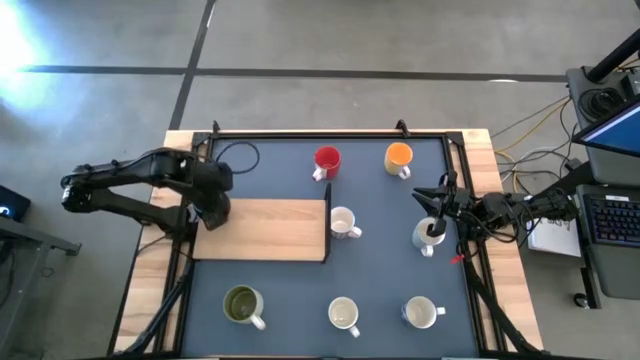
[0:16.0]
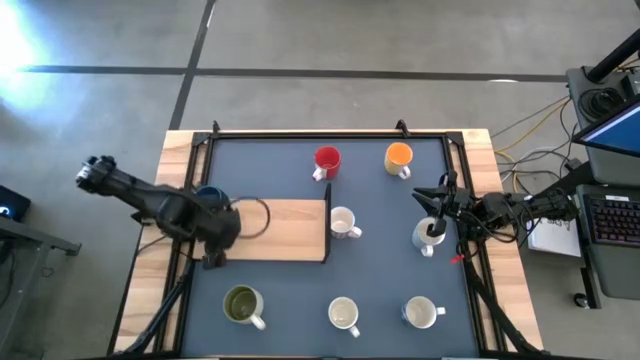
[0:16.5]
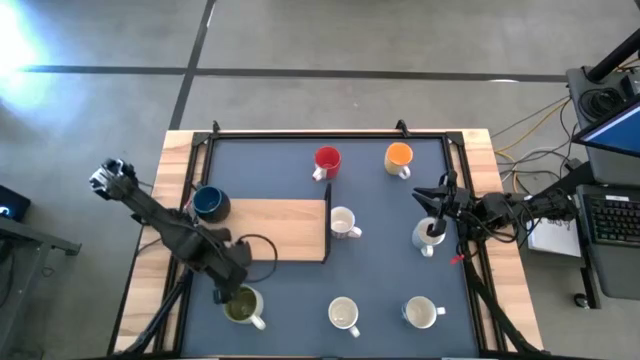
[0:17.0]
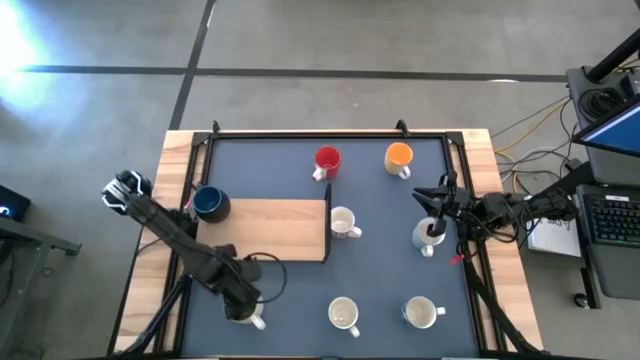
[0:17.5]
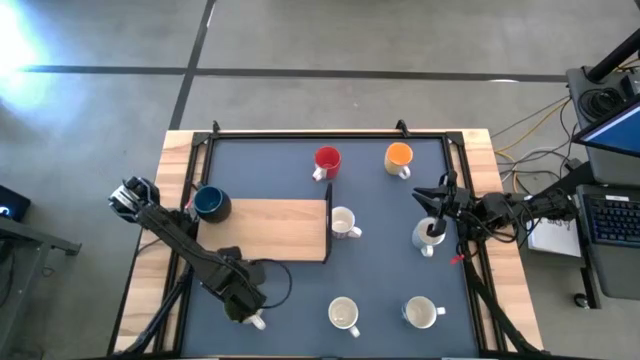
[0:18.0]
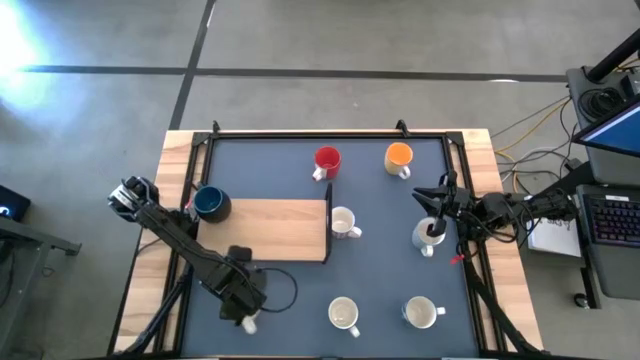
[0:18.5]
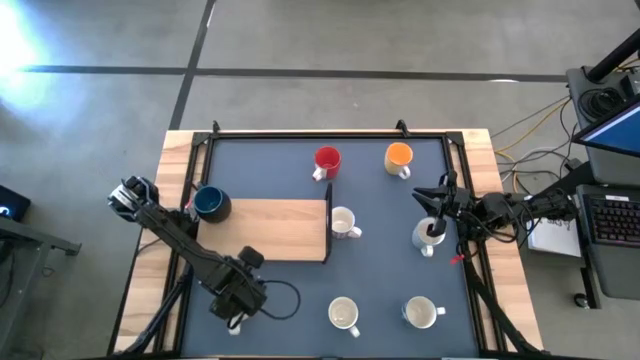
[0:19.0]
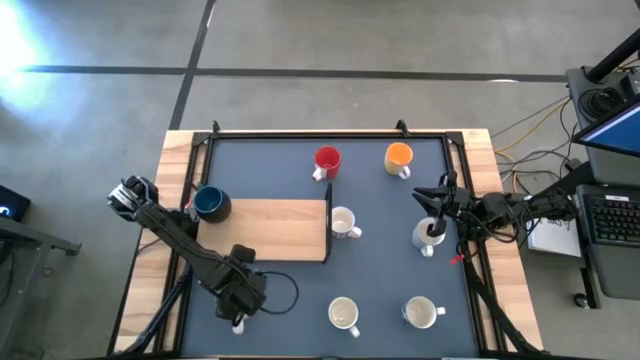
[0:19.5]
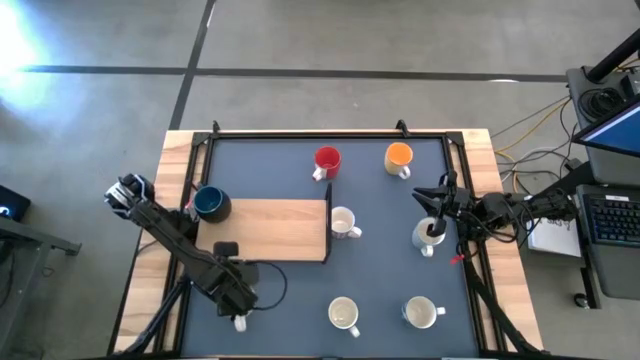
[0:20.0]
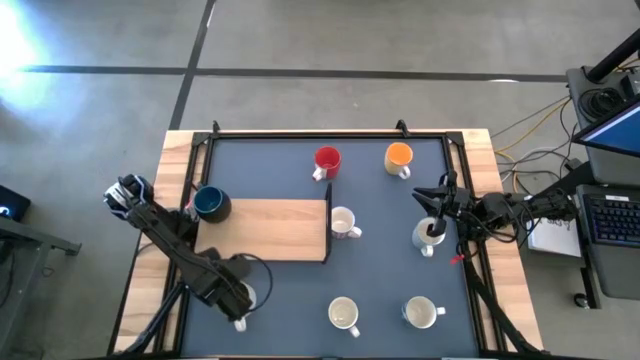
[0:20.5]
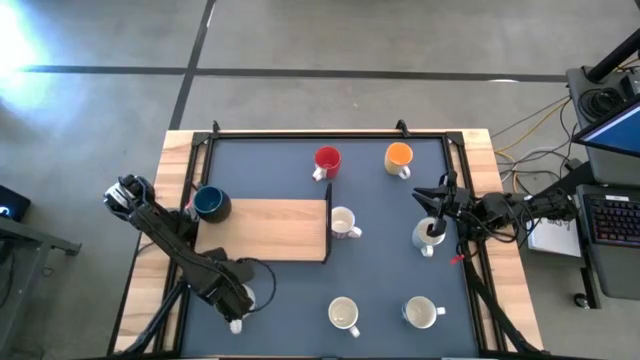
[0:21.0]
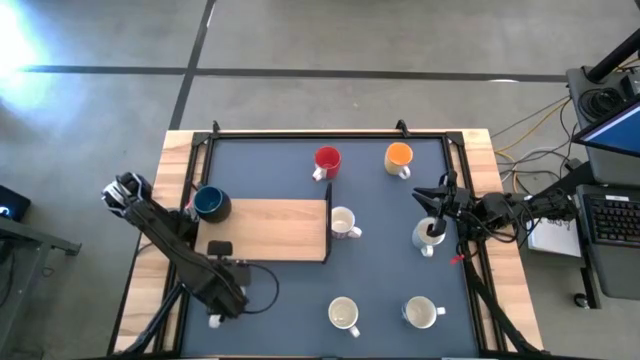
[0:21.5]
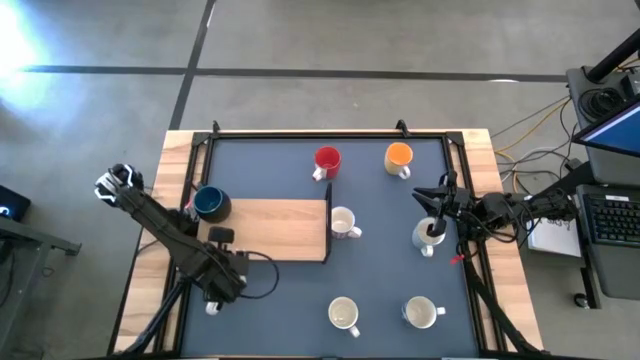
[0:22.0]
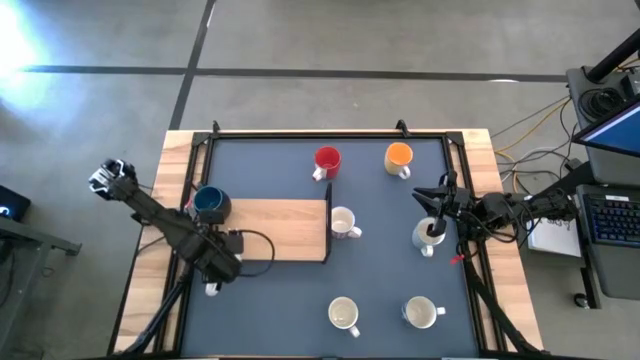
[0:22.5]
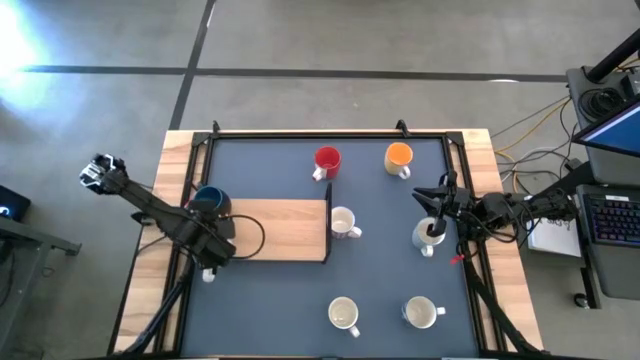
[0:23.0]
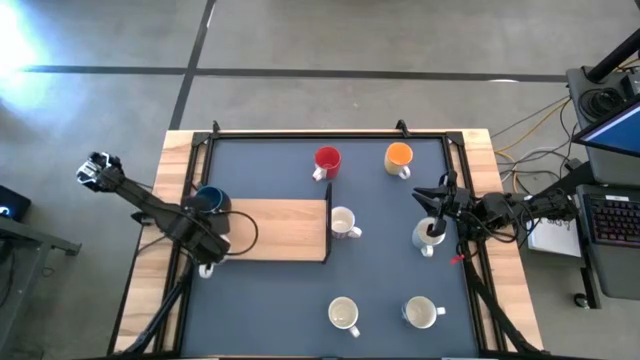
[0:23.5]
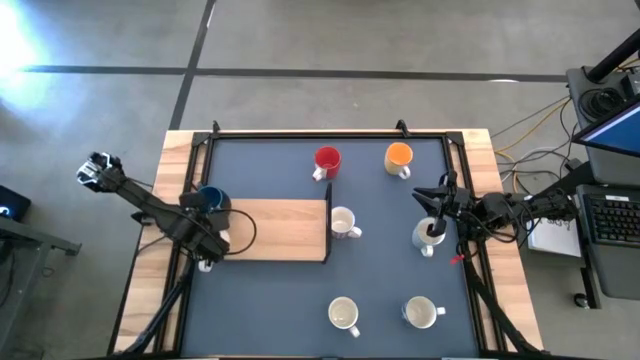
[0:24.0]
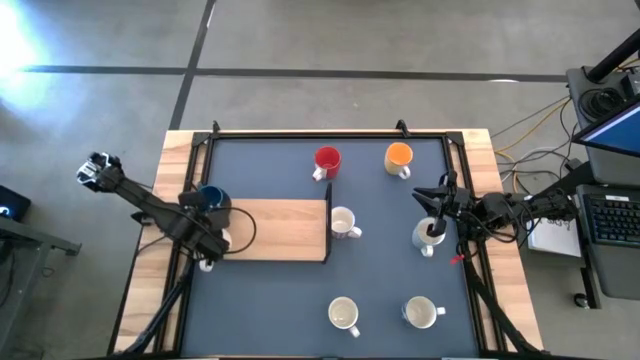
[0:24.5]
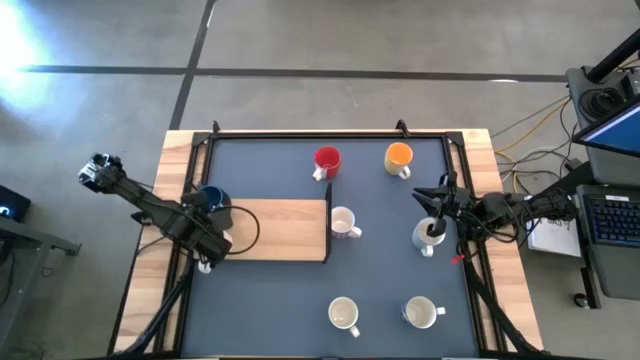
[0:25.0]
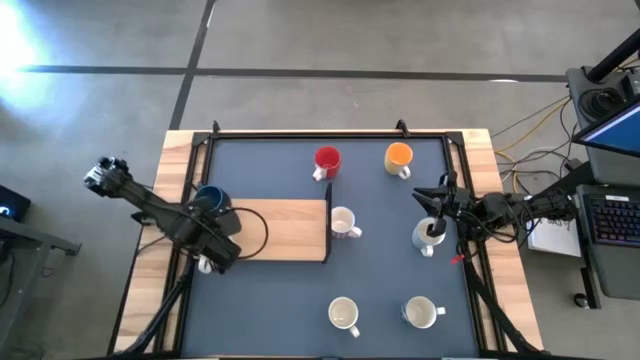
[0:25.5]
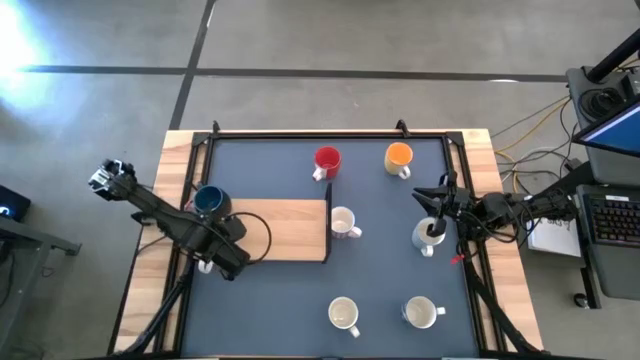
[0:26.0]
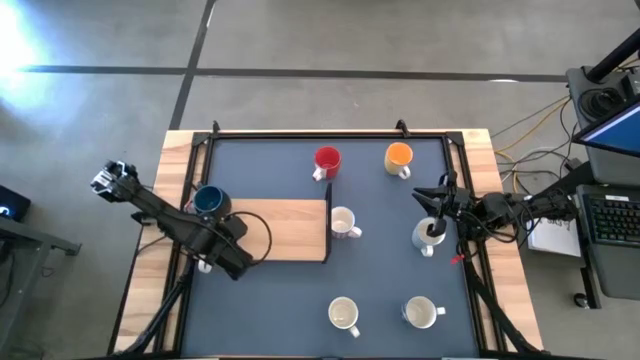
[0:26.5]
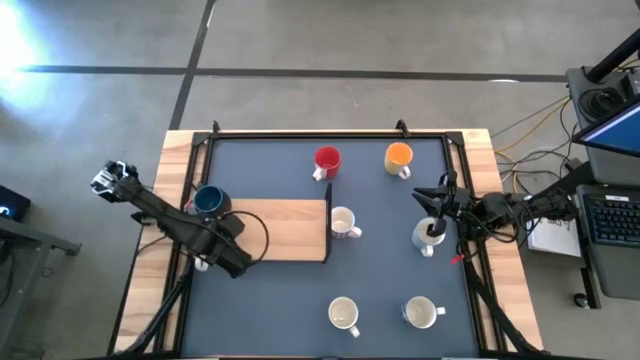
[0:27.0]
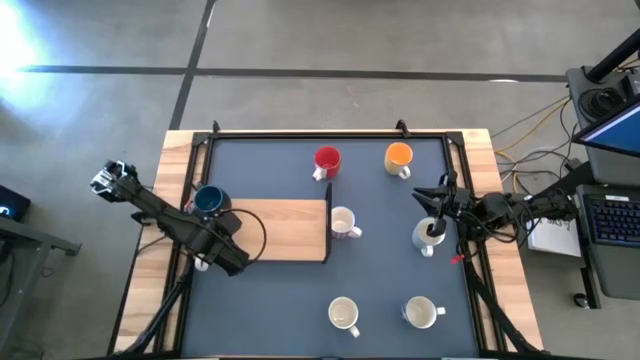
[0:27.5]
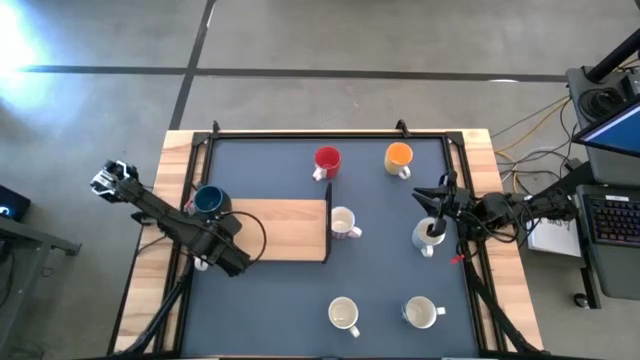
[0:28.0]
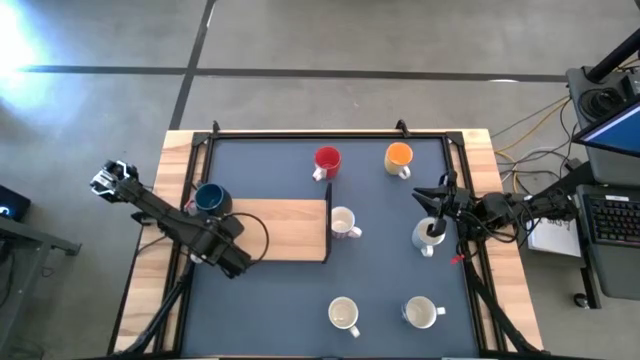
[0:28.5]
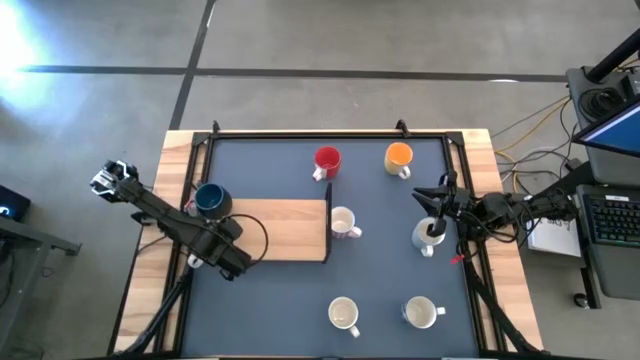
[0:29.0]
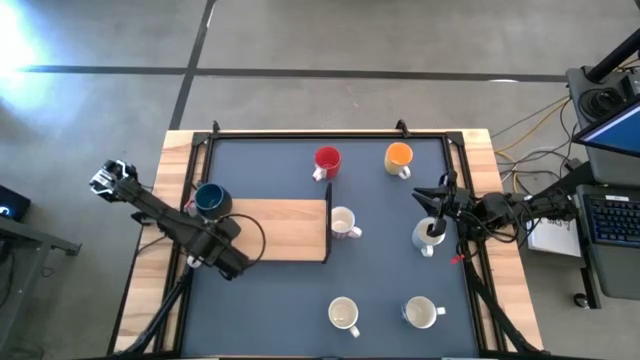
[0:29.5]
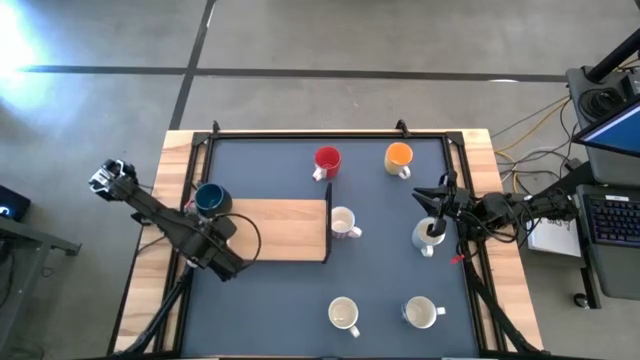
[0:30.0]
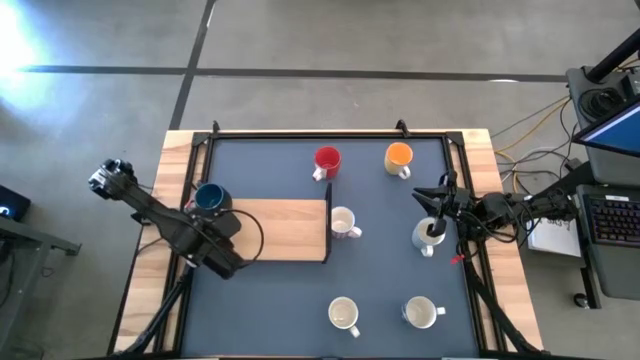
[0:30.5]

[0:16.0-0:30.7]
Task: Place coffee mugs
Put the green mug on the shelf

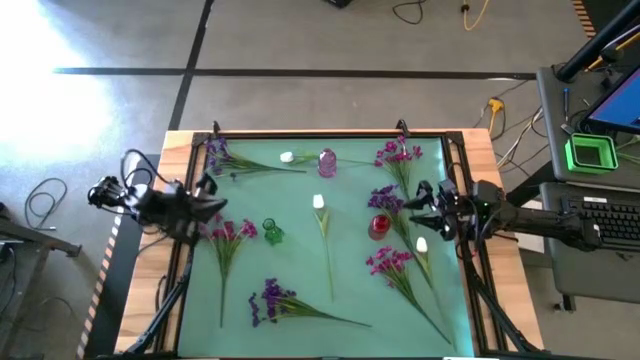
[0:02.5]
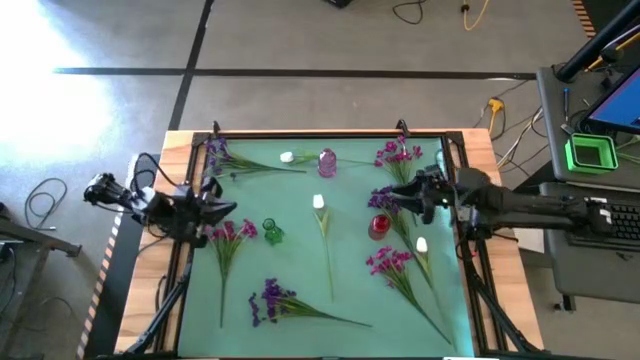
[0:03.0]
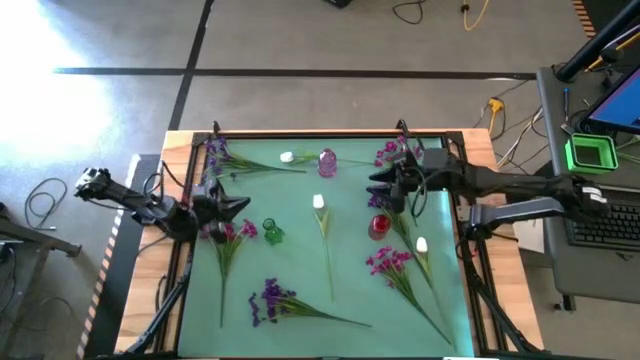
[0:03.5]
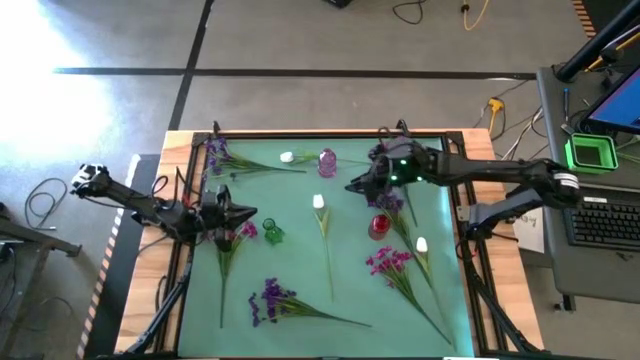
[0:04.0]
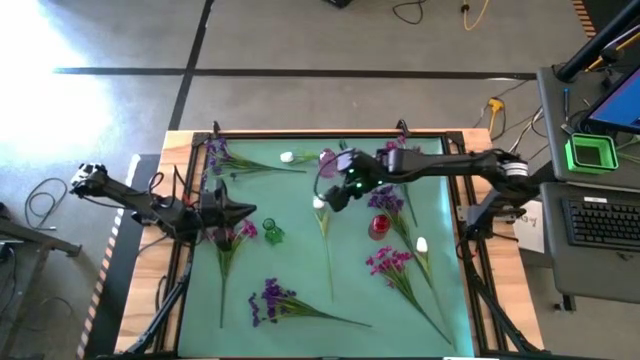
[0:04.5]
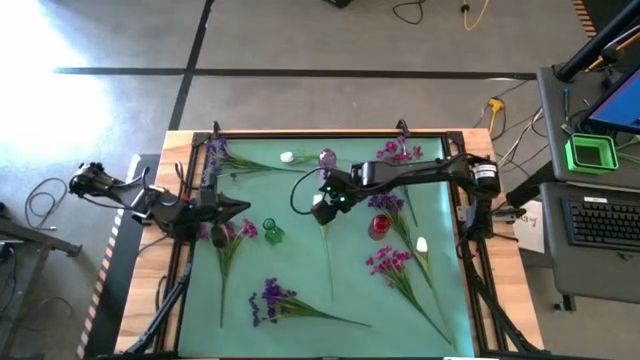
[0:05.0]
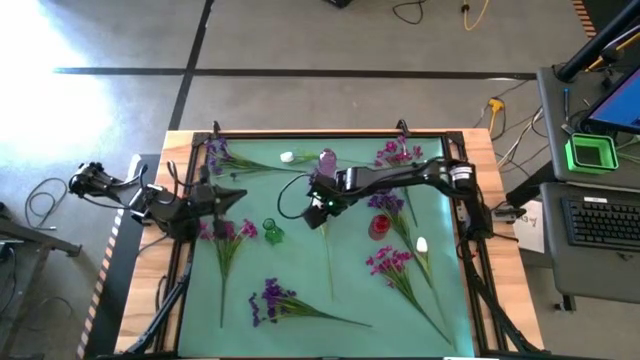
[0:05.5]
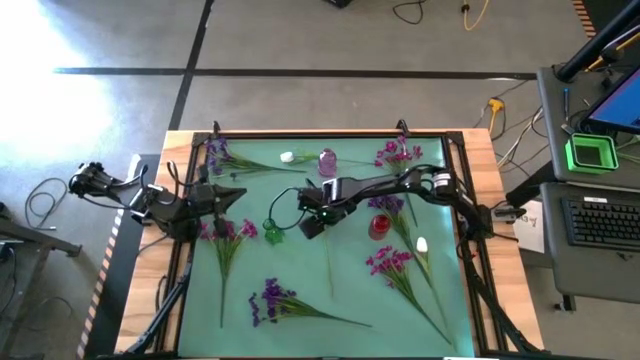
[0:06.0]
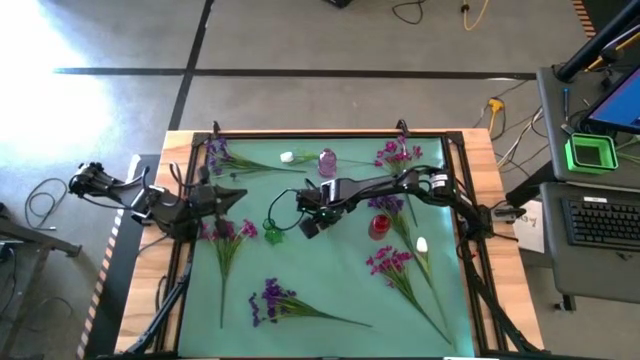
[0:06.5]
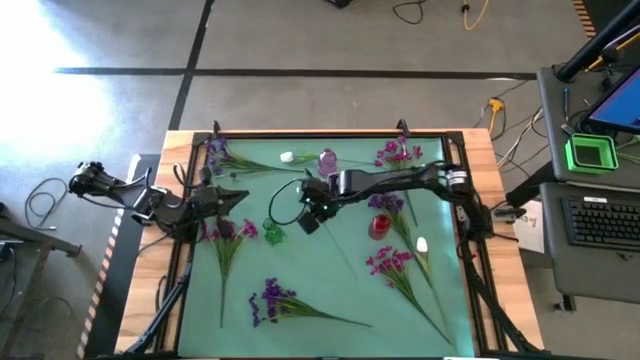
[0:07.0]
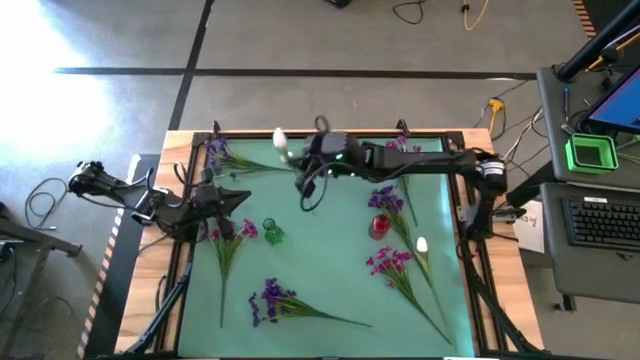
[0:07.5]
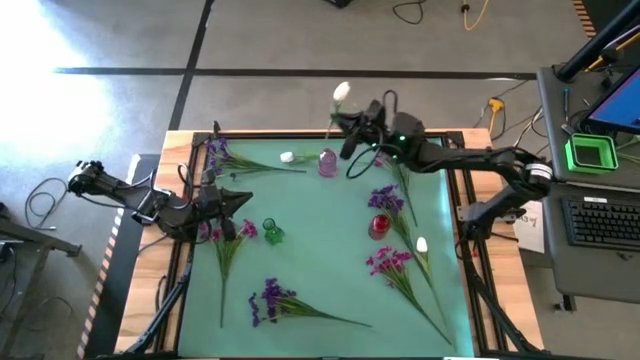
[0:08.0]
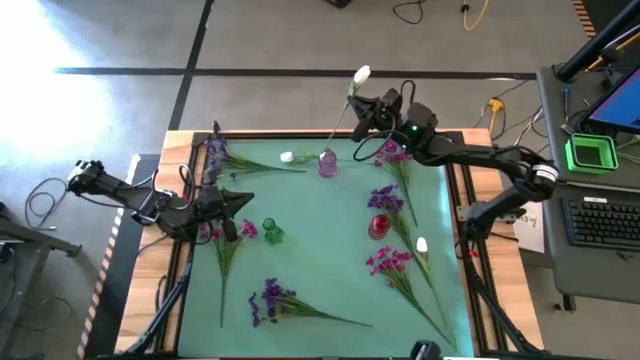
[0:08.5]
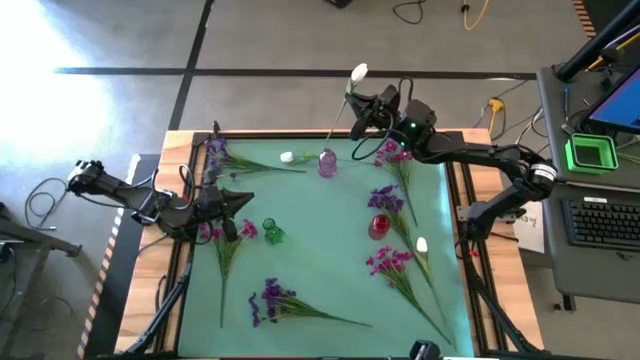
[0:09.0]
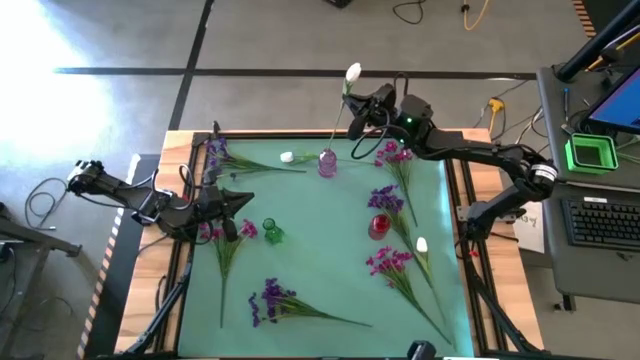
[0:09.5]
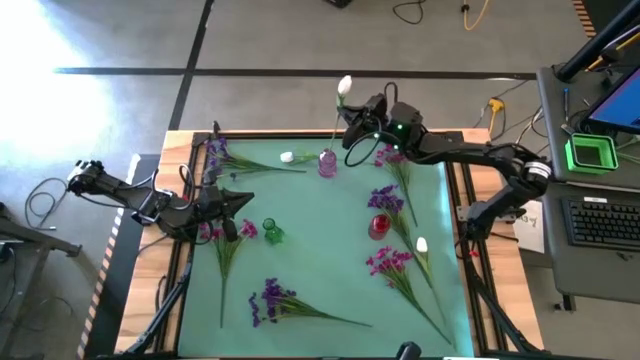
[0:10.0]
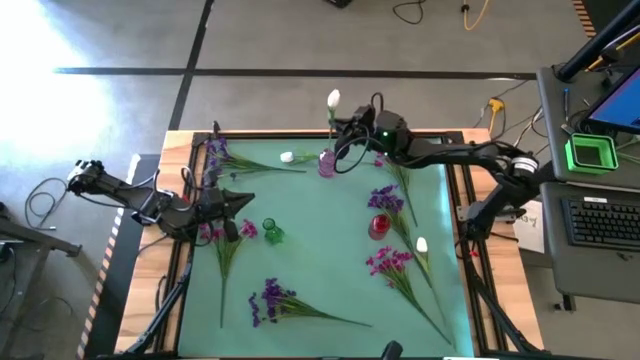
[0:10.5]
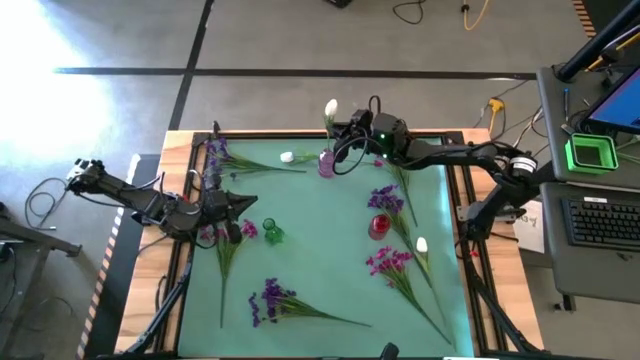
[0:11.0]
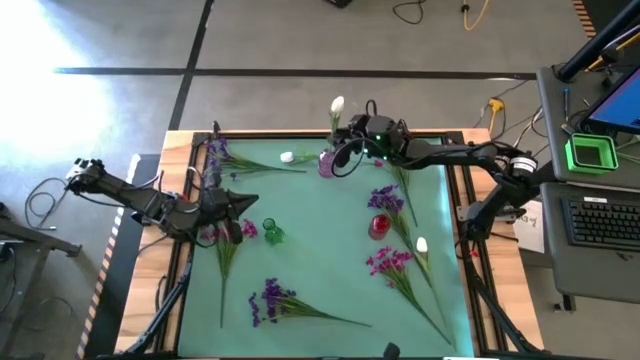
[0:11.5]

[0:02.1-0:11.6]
Task: Sort flowers into vase by color
Put the middle white tulip into the purple flower vase
